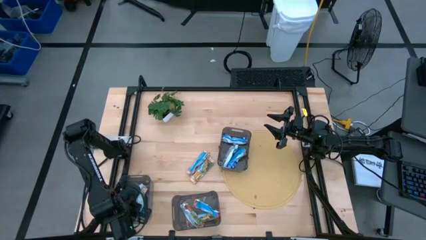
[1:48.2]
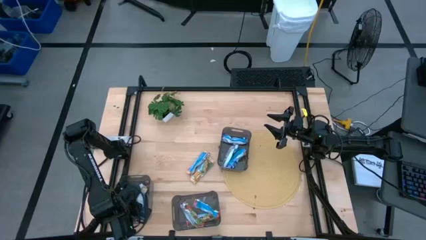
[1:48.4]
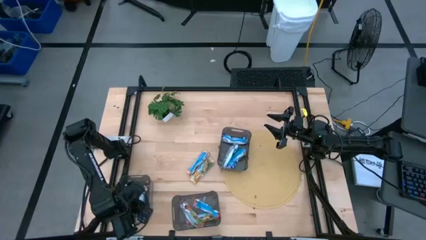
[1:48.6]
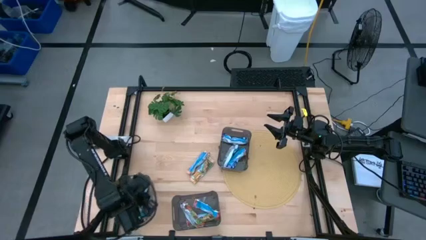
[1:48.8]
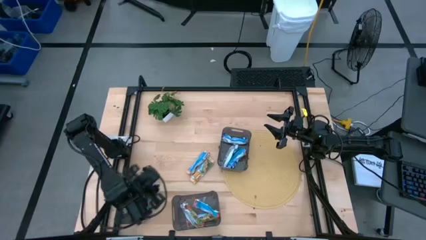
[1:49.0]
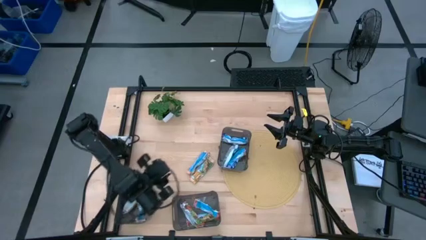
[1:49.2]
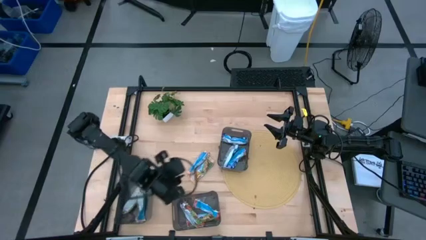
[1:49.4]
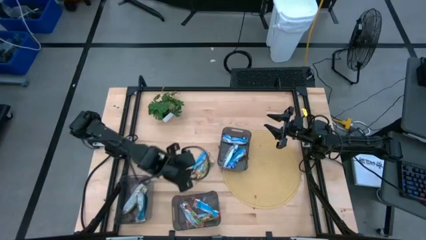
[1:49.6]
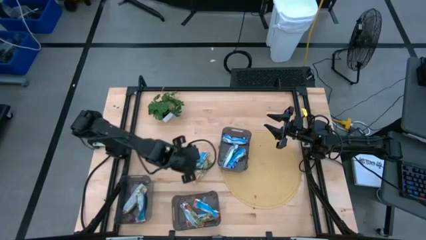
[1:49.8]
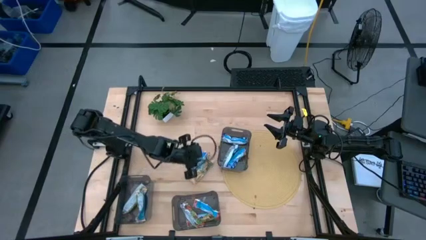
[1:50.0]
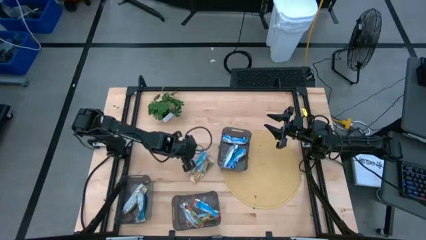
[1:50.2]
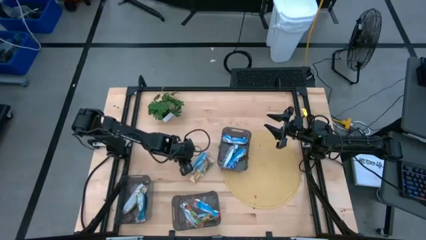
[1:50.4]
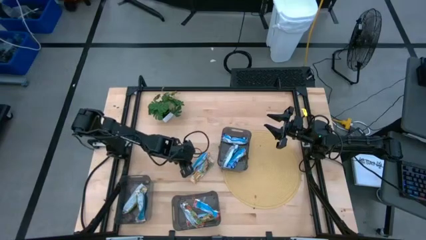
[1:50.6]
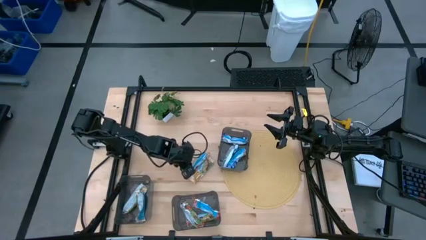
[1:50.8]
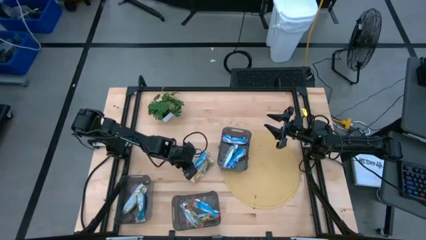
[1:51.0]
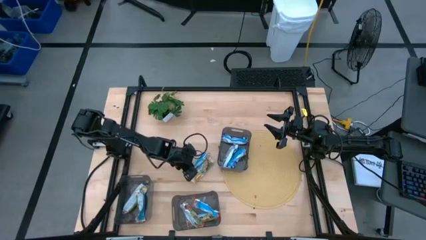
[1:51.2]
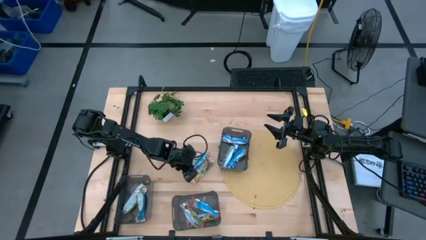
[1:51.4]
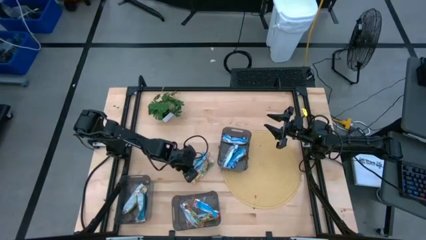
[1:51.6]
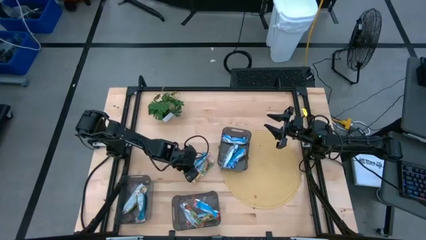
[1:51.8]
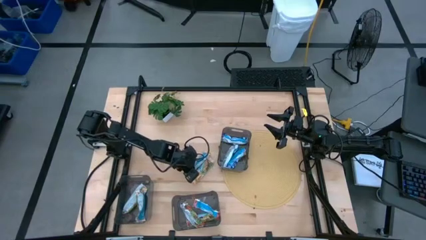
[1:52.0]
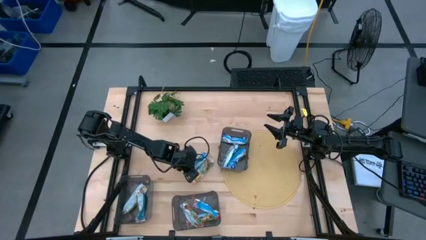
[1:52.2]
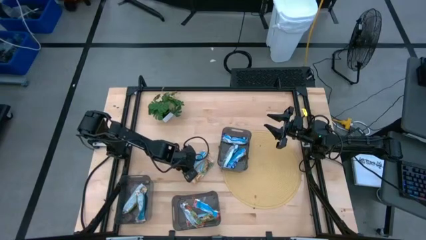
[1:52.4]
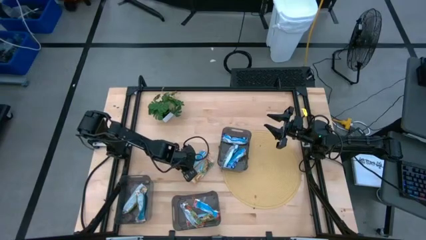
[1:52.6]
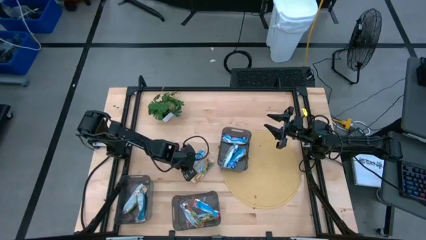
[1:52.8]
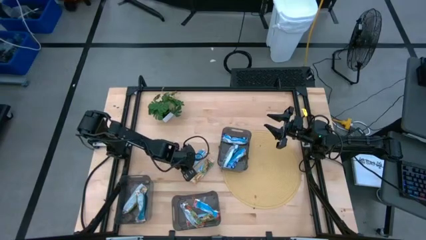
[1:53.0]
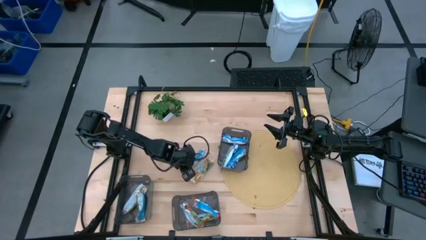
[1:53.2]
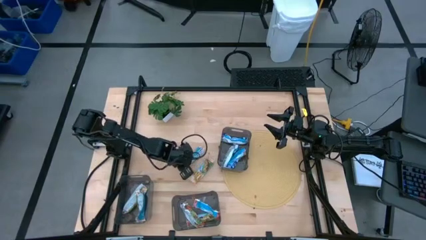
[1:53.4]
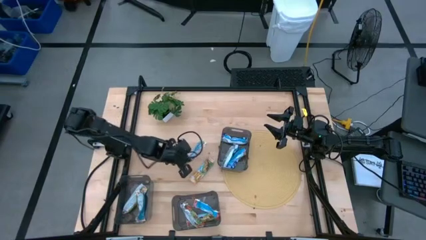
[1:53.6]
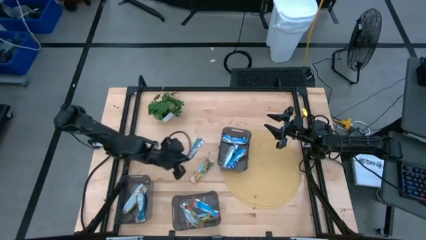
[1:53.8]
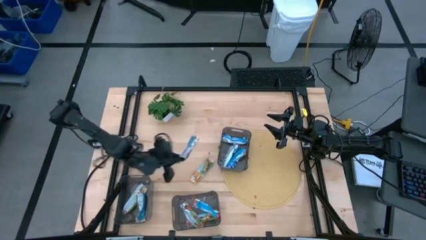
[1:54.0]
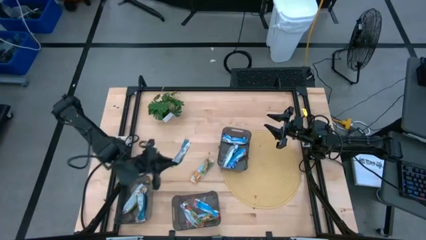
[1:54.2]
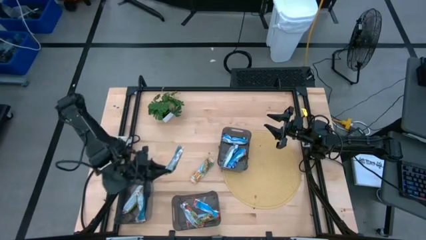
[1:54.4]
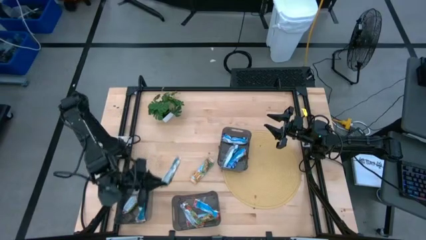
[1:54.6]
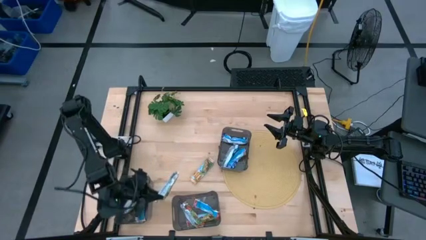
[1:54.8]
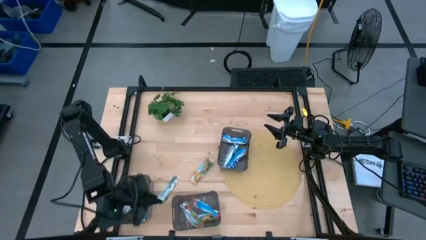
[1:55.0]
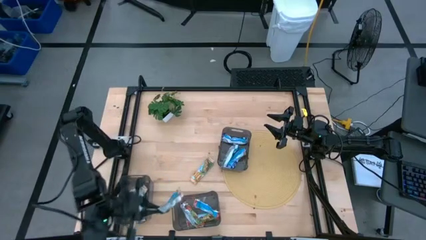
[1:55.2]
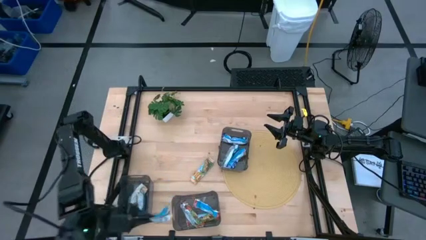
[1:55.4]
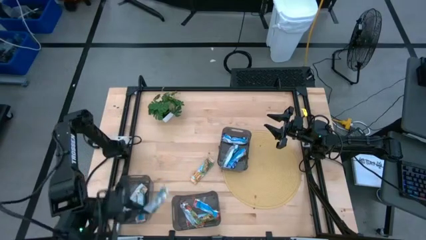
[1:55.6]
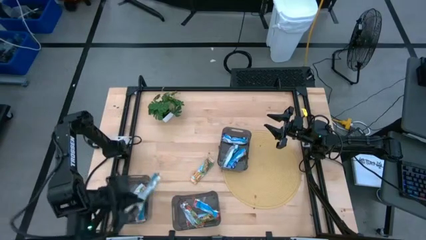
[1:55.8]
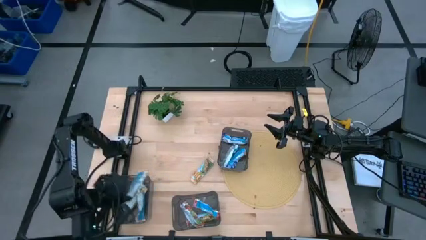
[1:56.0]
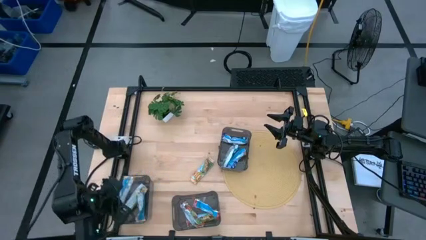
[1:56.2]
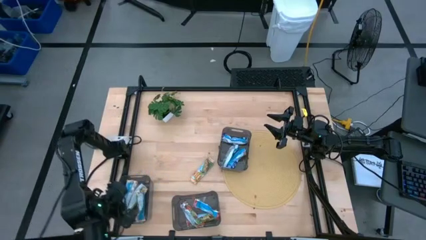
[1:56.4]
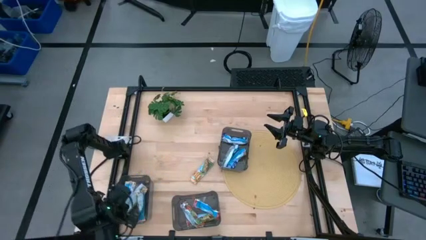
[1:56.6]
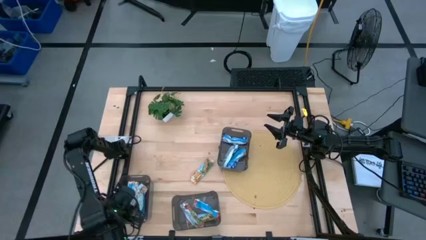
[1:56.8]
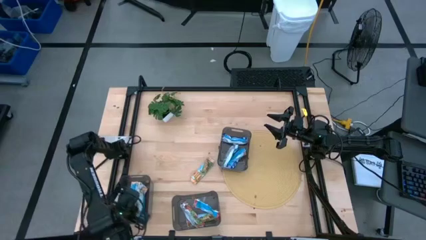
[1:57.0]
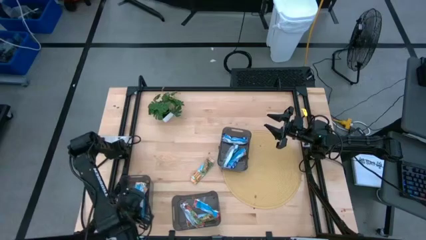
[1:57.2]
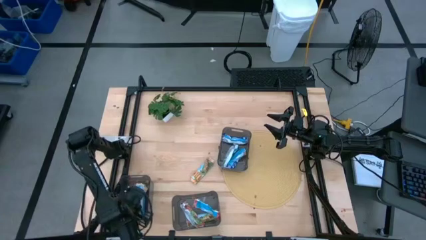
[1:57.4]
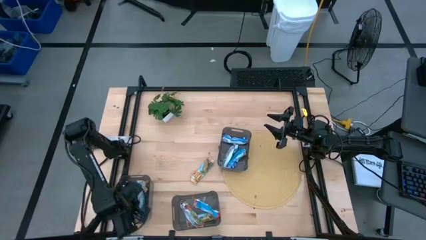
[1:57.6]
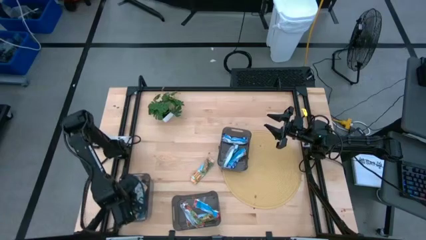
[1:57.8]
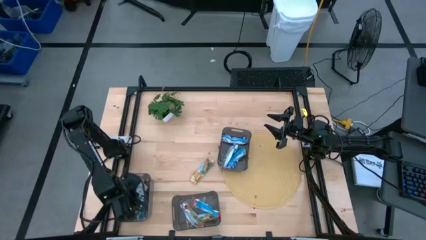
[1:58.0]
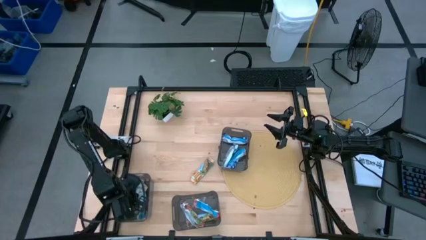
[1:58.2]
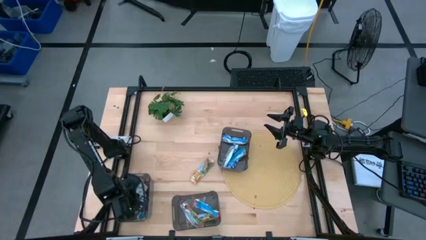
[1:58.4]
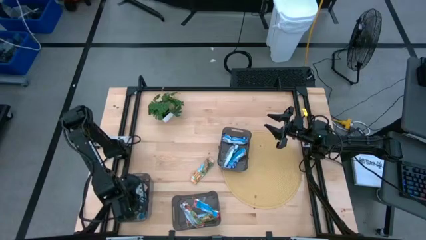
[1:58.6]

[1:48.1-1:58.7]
Task: Pick and place Granola Bars by type
Put the left yellow granola bar into the bottom left black bin

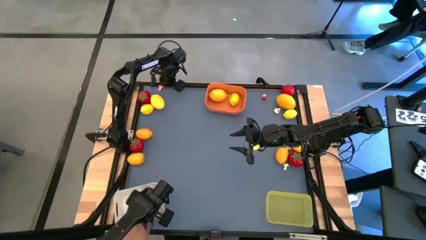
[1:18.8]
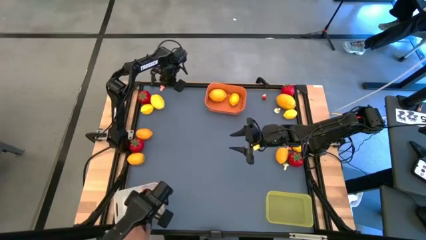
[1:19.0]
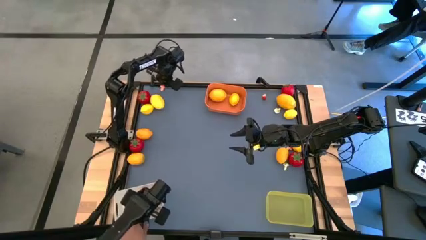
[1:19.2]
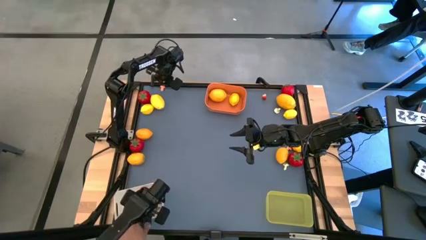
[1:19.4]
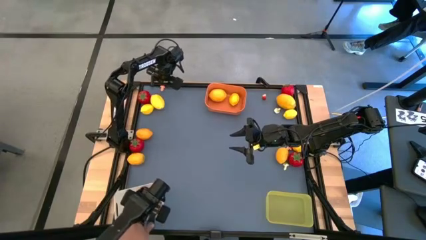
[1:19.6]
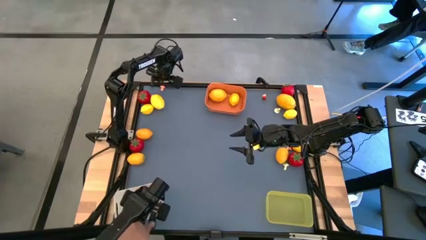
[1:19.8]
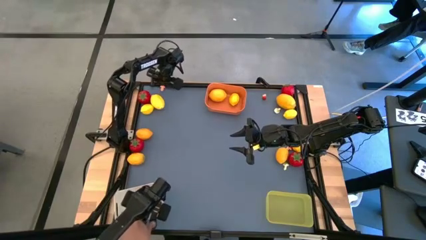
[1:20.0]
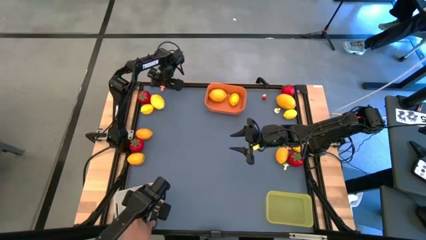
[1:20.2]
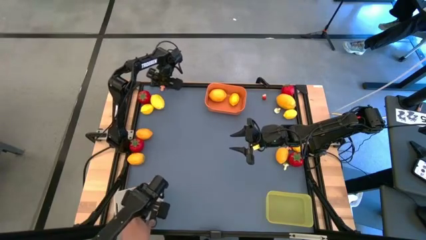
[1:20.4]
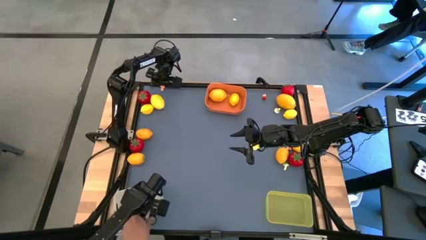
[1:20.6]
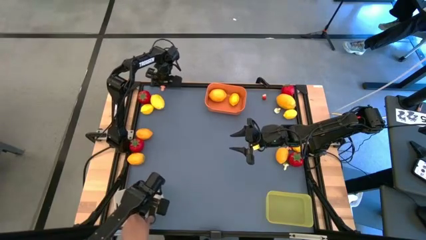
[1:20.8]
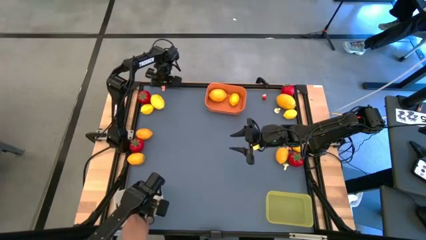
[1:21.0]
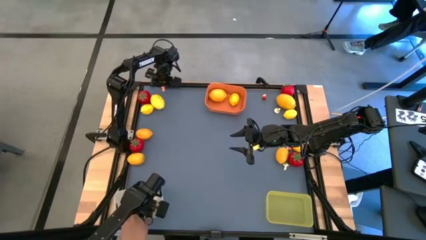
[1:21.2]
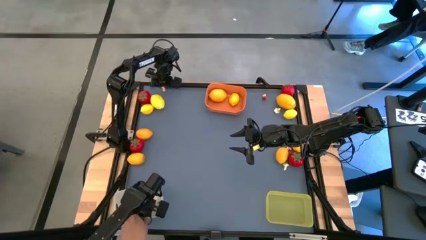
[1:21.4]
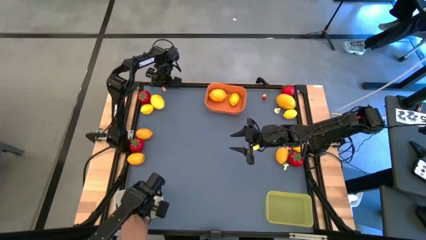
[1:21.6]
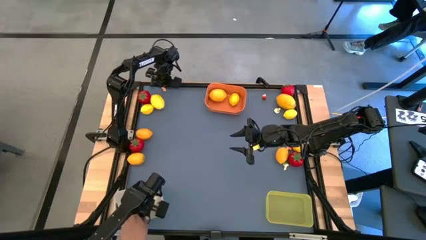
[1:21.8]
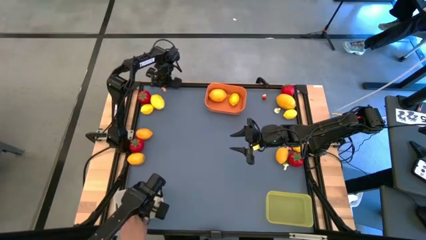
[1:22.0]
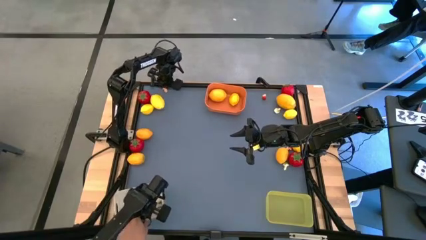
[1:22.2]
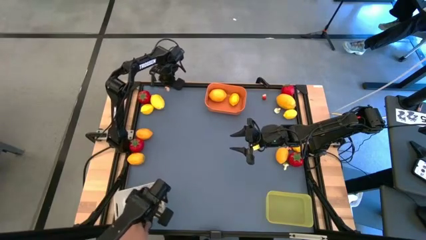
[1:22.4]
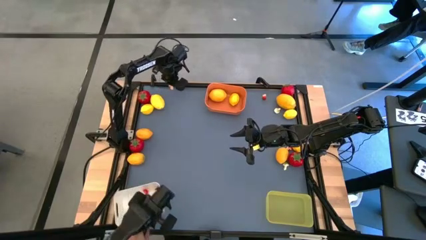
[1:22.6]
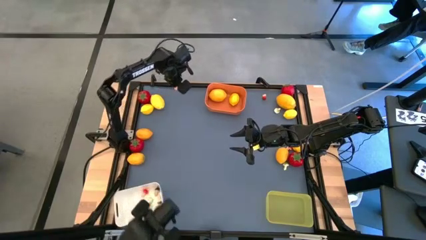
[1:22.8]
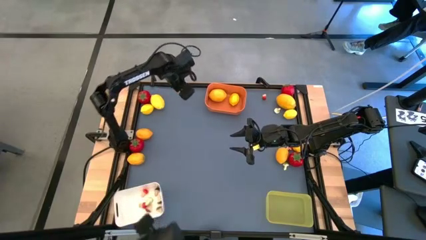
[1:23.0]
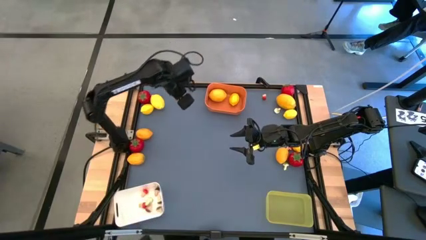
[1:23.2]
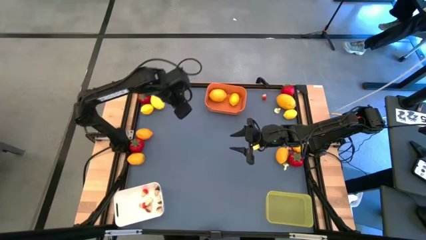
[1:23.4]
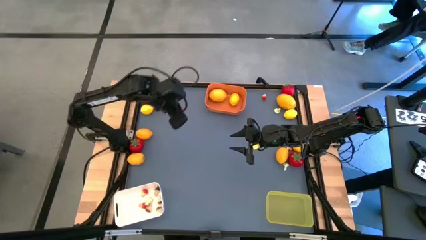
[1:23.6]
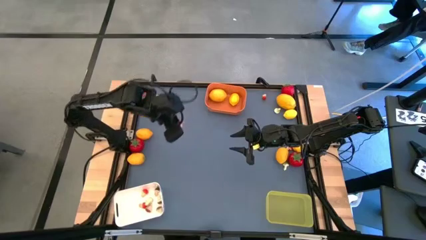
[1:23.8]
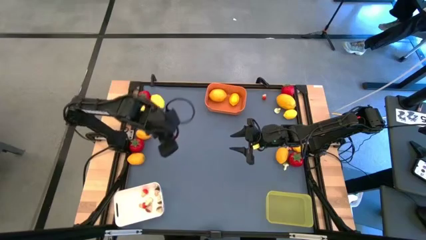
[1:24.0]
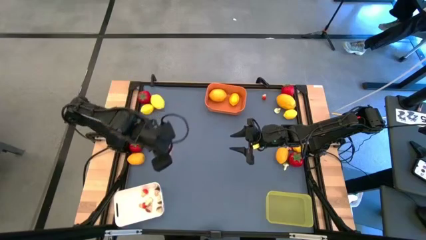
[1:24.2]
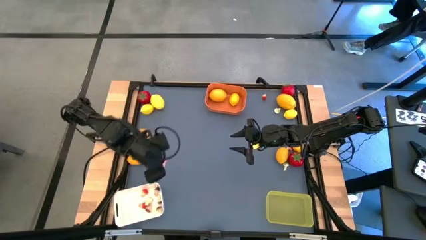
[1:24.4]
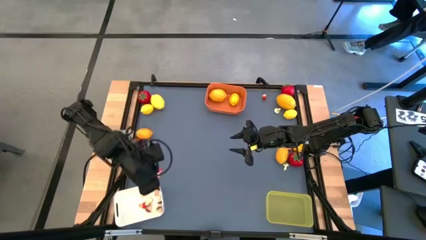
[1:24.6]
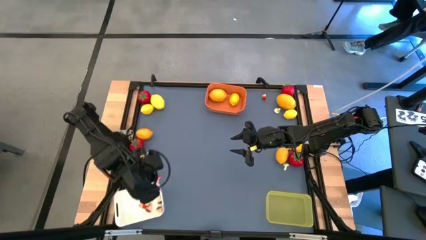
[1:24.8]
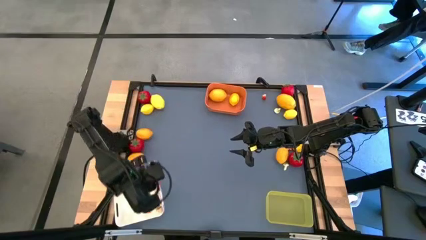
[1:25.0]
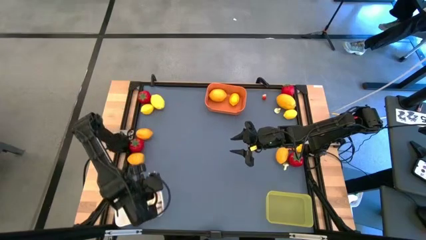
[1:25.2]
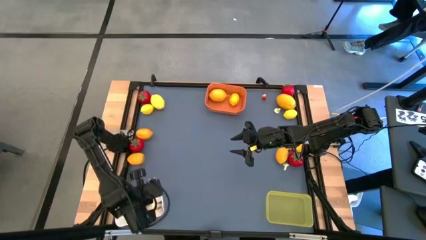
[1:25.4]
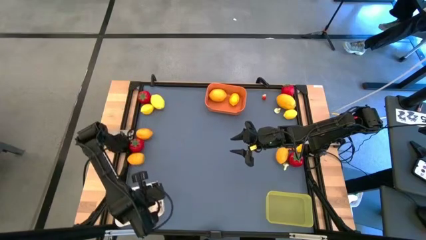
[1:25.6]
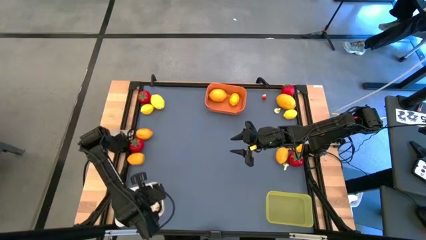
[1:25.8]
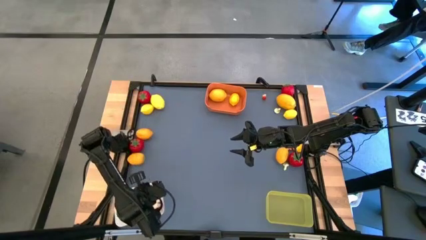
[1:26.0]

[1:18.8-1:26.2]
Task: Sort produce into baskets
Put the red mushroom into the white bin
